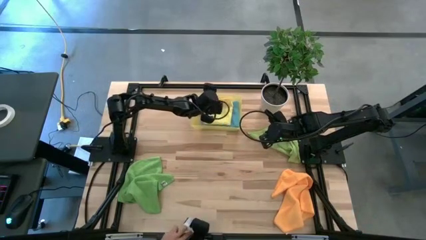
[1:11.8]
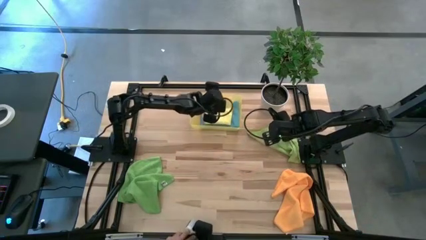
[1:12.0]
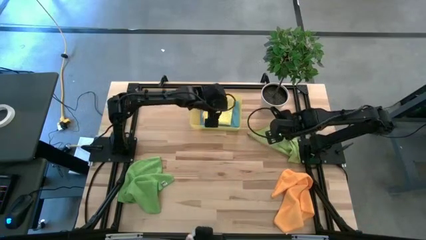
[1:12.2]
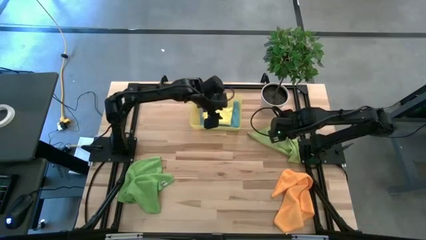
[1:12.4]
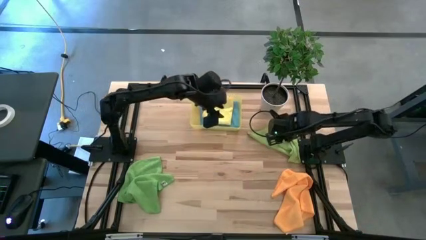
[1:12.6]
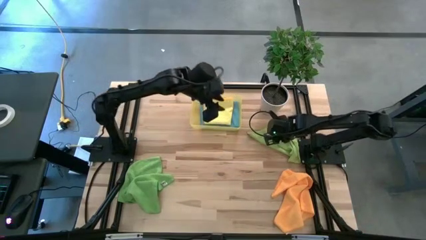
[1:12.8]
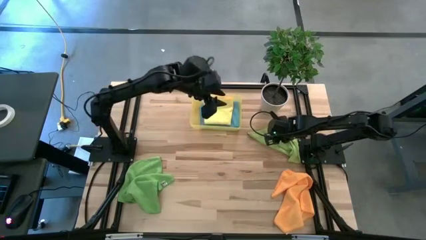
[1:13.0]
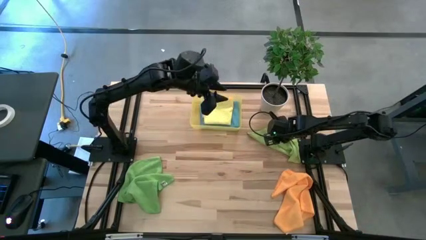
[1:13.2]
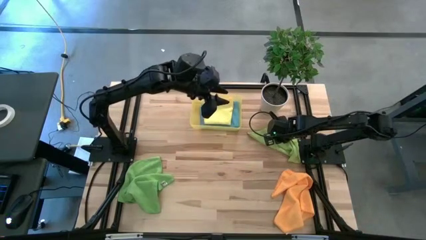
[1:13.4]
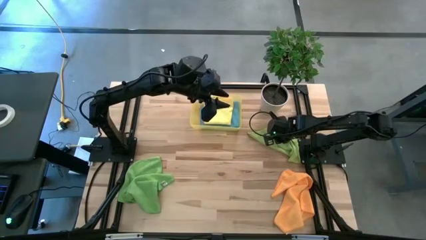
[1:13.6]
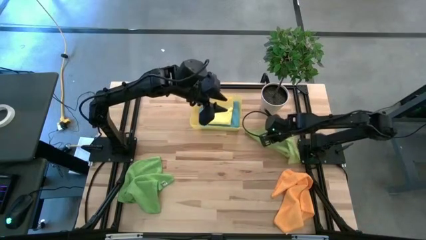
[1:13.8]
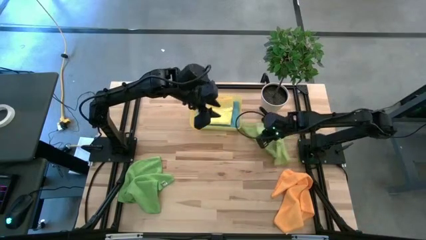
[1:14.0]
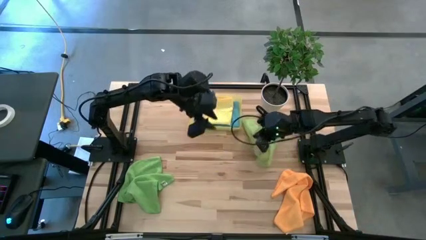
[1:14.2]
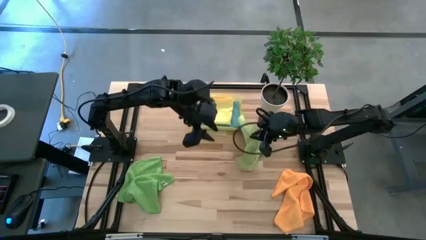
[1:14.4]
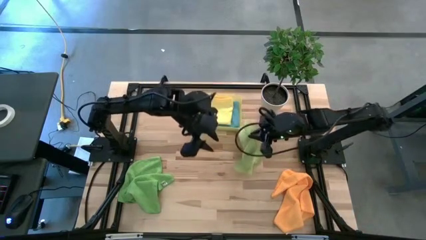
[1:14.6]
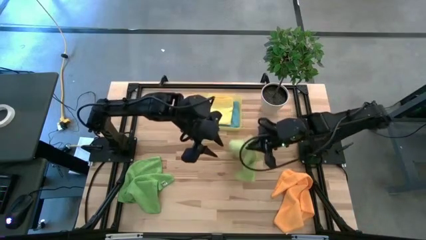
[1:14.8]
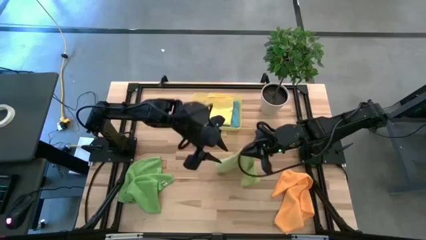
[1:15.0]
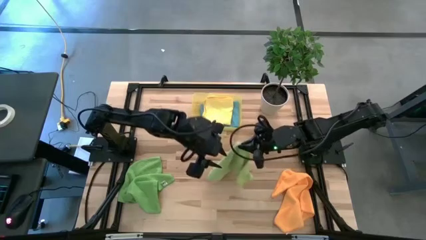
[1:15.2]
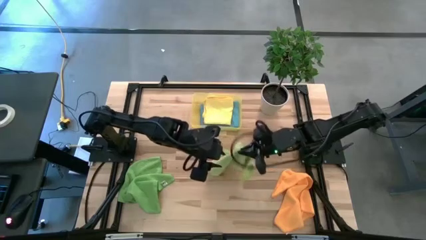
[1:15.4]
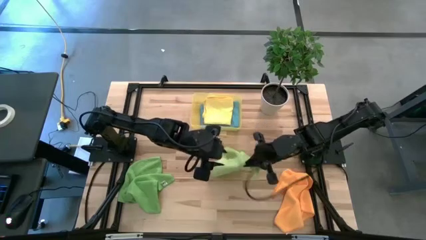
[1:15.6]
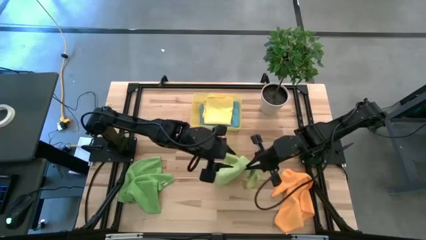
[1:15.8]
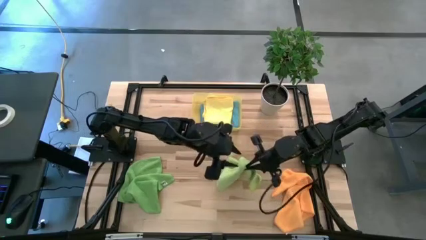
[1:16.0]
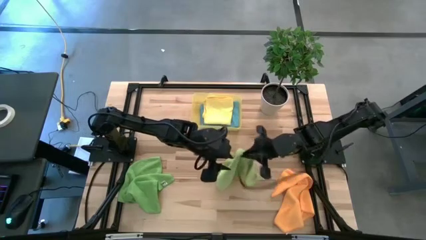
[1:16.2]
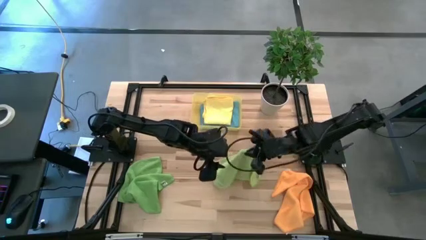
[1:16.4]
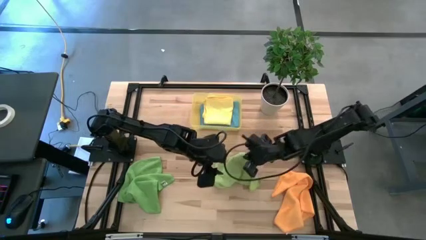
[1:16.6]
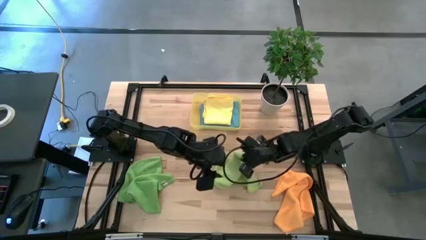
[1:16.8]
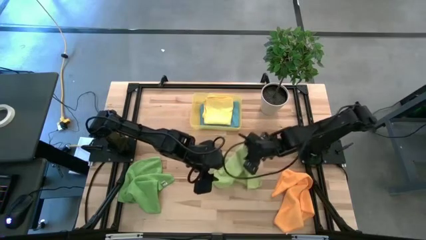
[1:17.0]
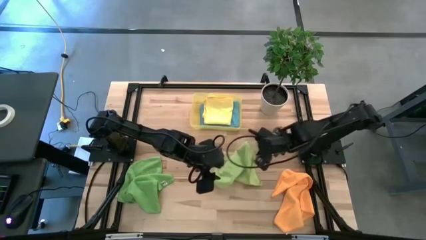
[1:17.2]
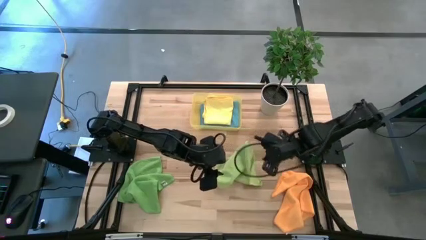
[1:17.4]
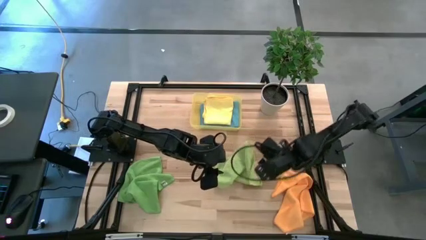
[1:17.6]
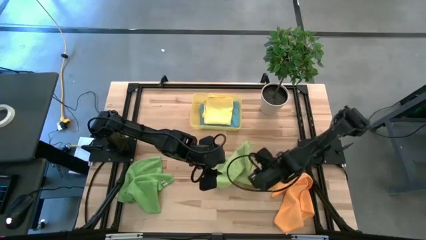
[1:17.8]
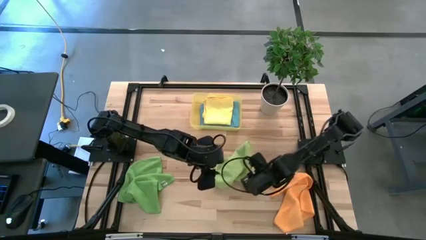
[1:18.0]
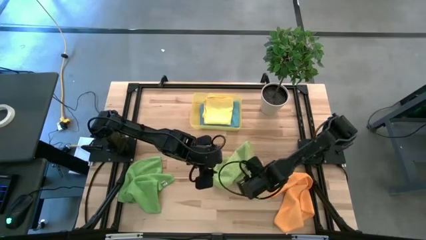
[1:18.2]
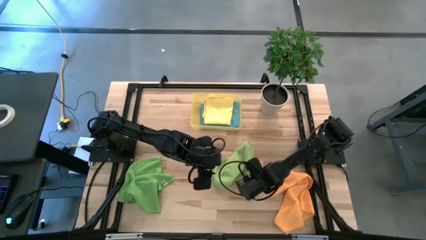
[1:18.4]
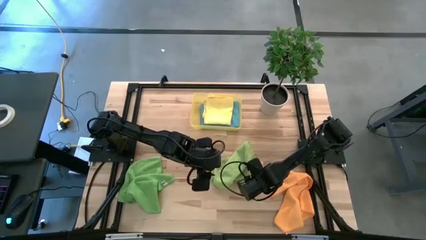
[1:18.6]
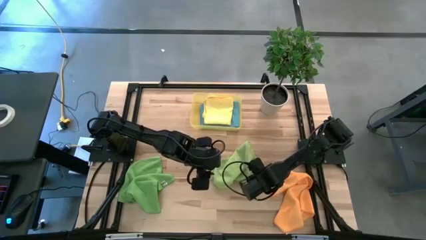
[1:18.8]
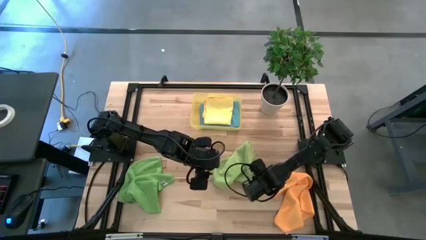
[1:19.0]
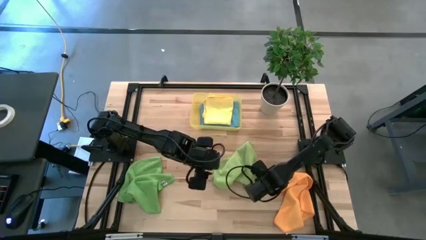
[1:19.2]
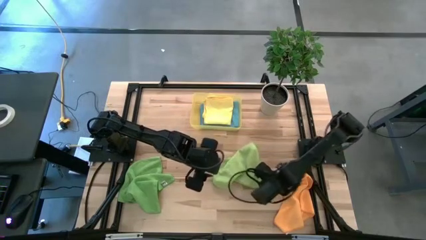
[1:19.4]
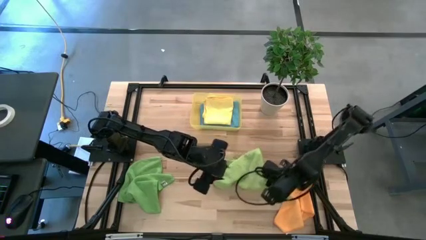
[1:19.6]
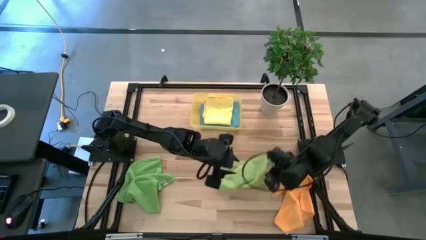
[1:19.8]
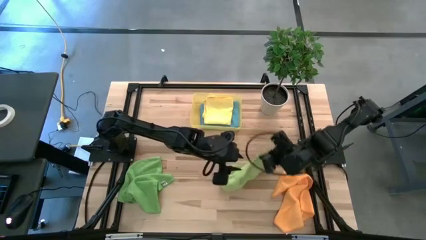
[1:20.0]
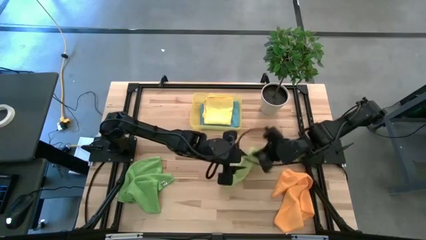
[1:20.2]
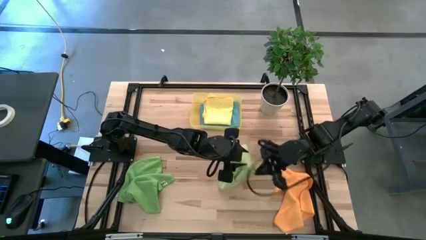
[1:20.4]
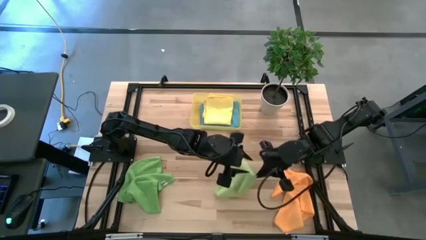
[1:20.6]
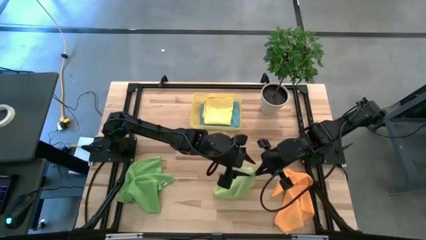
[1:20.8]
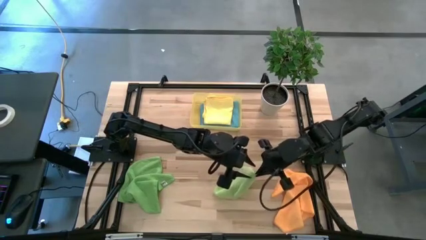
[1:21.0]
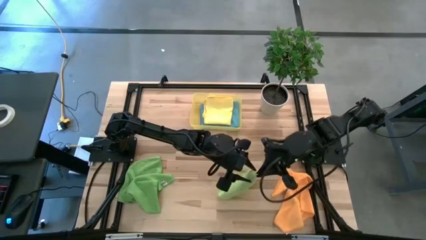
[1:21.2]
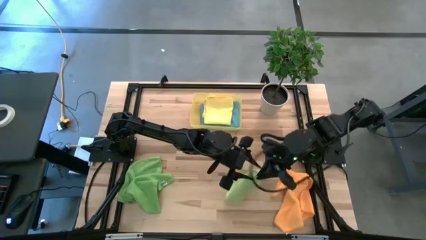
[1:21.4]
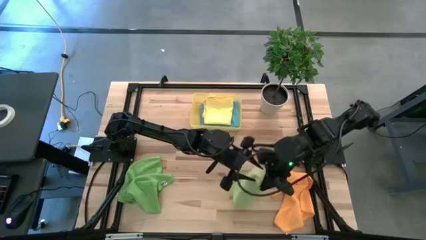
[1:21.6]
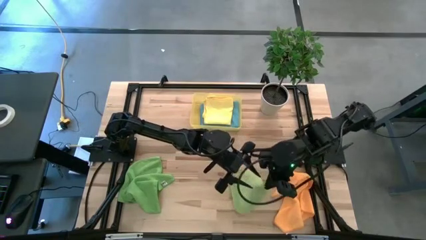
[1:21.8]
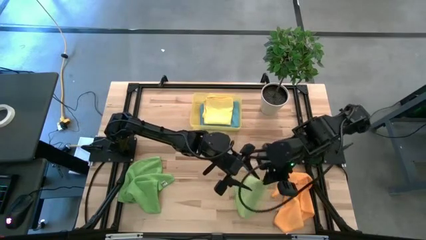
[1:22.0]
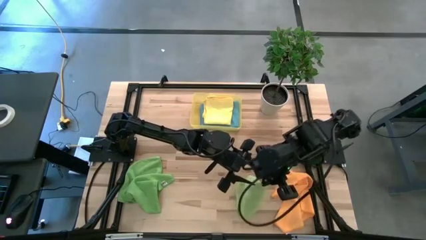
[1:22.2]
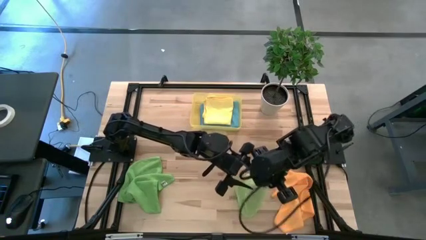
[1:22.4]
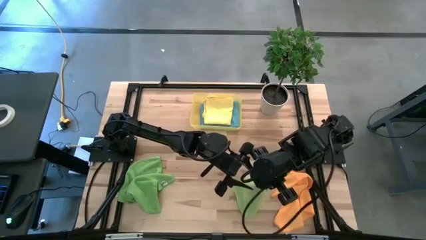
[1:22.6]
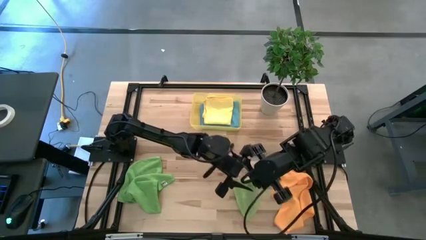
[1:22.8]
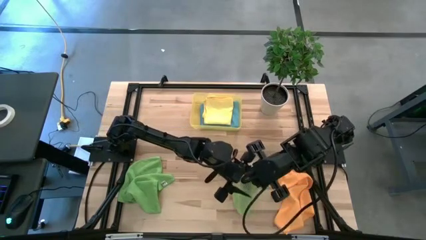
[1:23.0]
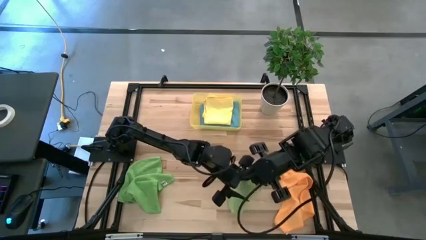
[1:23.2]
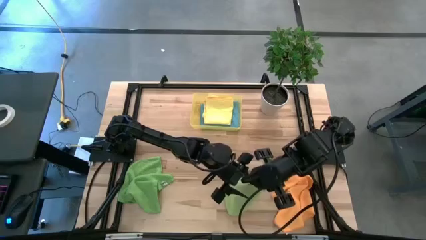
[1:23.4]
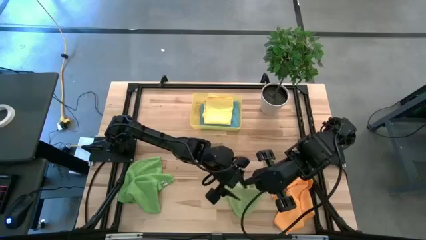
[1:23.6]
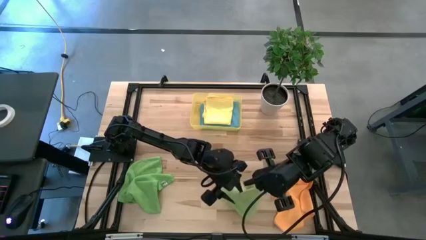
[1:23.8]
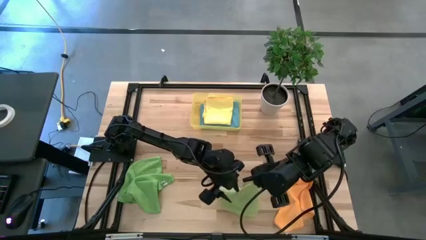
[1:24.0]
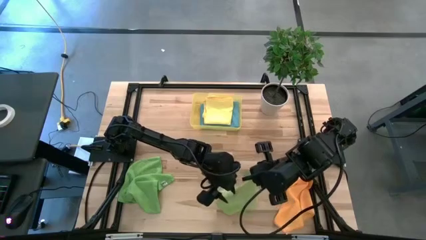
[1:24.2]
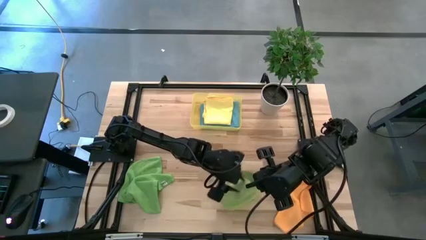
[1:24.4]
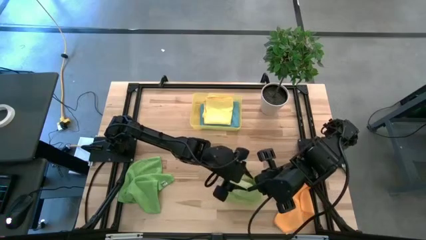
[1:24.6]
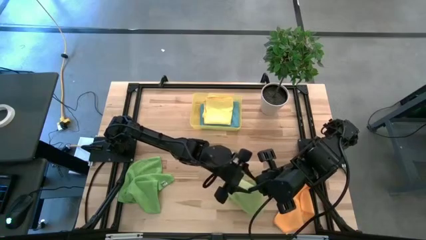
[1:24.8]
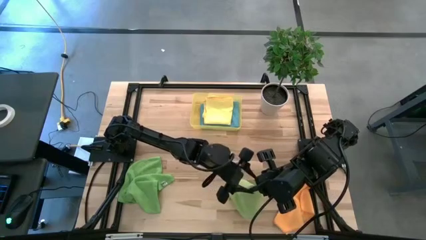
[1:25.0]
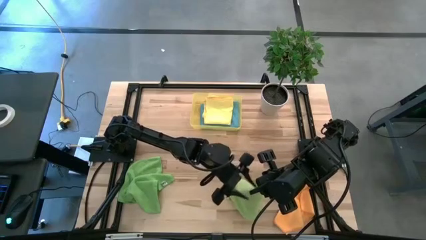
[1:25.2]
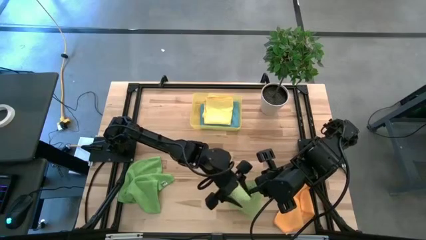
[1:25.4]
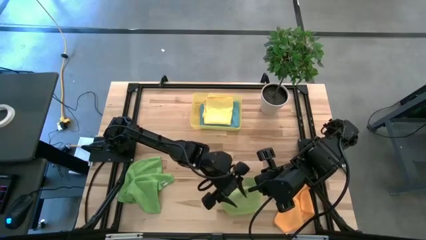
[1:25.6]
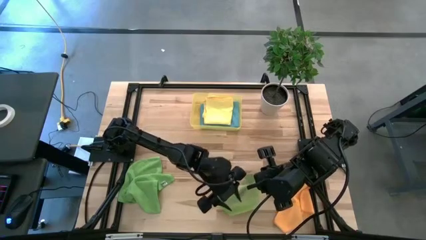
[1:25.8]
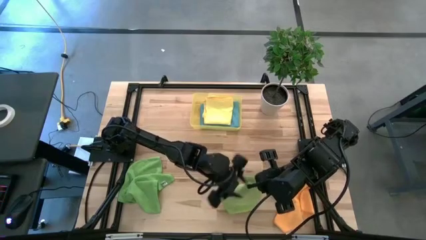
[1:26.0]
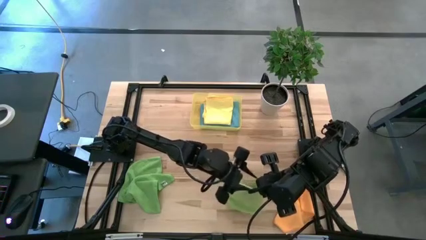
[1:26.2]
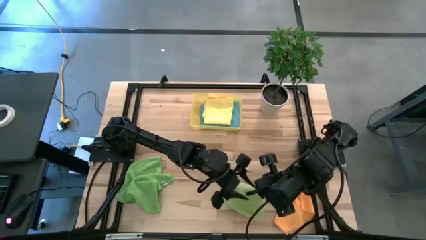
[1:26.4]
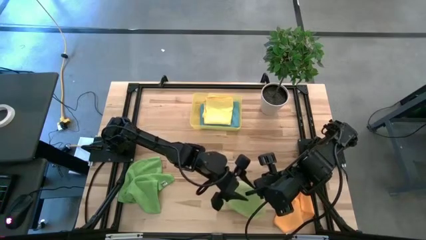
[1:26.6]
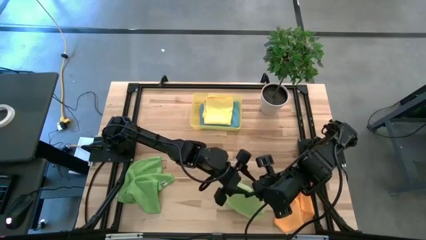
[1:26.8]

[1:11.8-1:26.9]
Task: Fold microfiber towels
Fold the light green microfiber cloth
